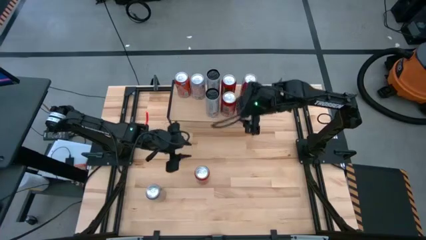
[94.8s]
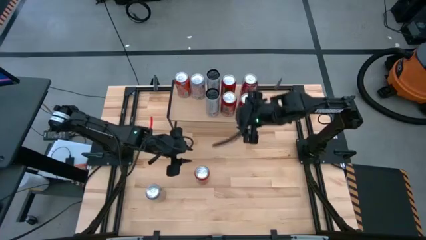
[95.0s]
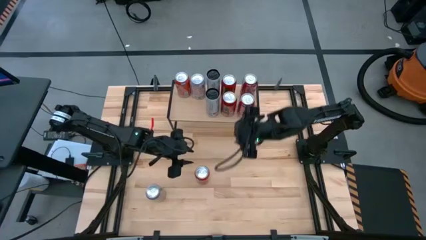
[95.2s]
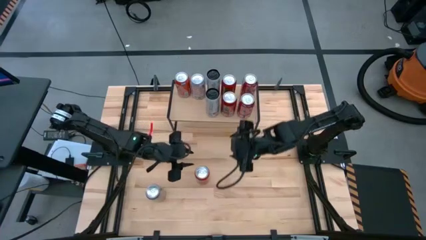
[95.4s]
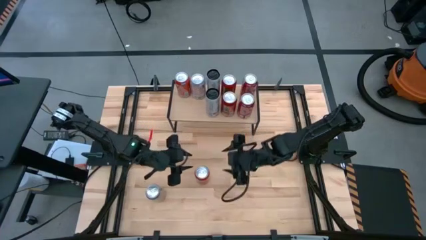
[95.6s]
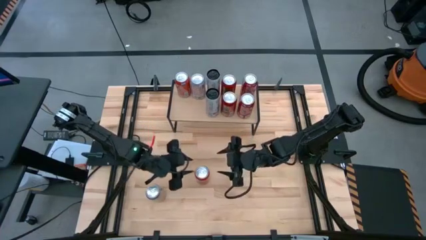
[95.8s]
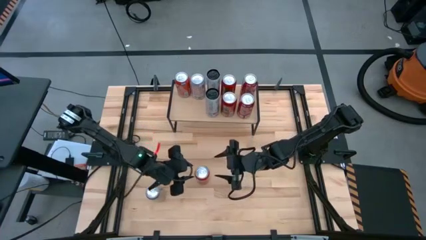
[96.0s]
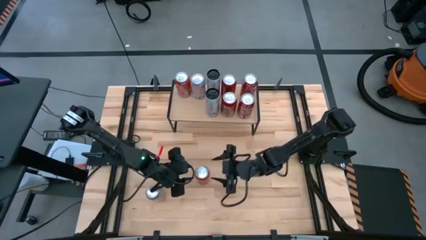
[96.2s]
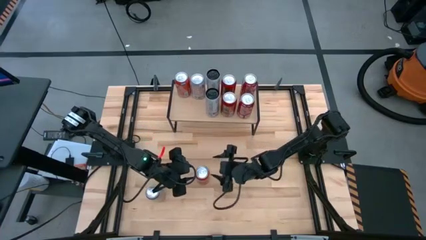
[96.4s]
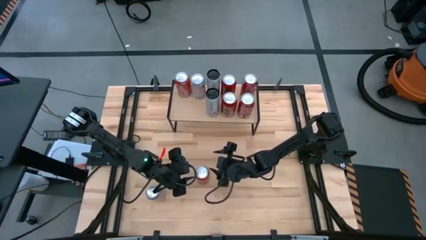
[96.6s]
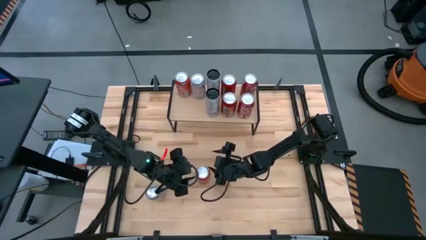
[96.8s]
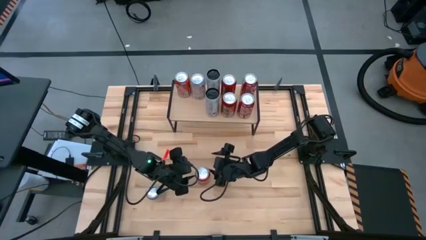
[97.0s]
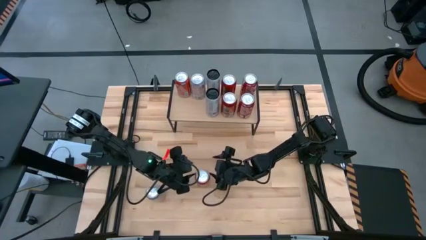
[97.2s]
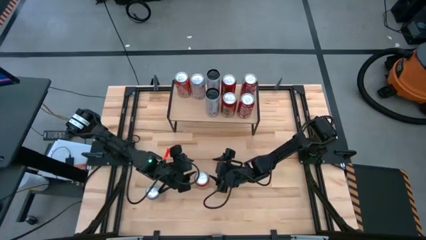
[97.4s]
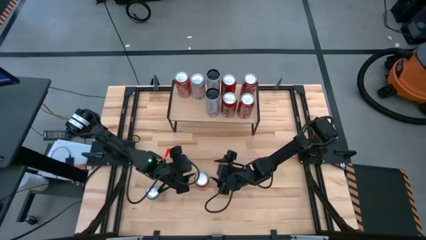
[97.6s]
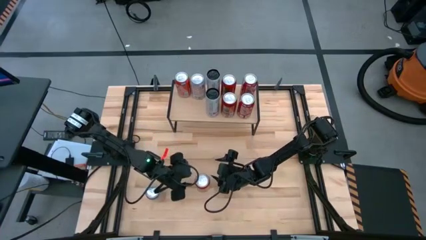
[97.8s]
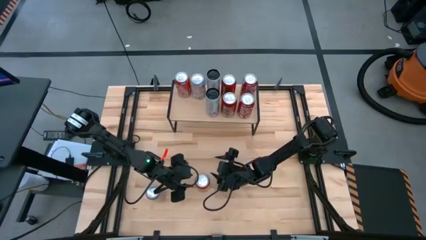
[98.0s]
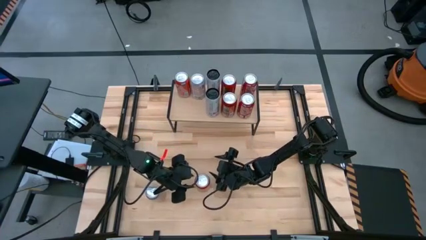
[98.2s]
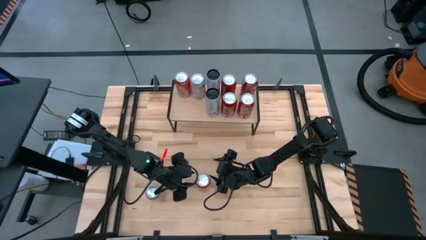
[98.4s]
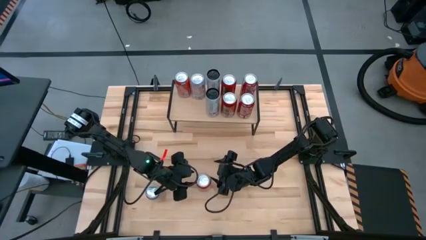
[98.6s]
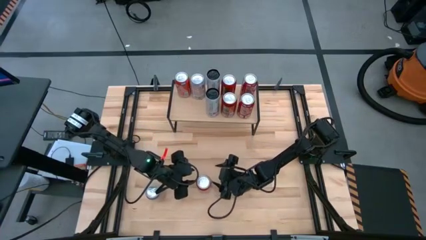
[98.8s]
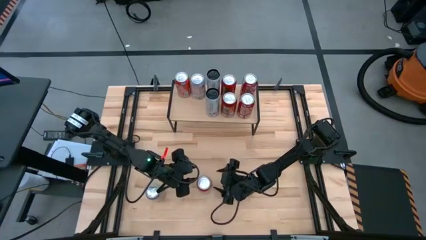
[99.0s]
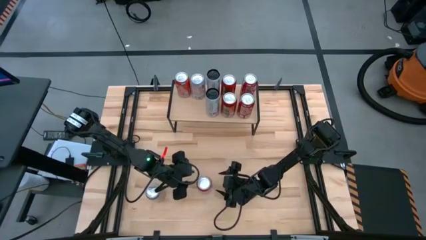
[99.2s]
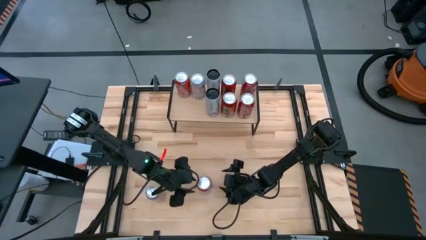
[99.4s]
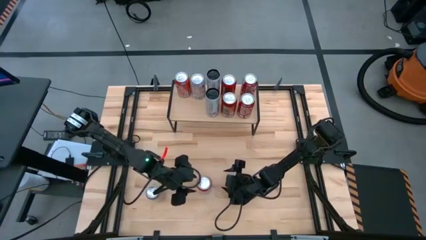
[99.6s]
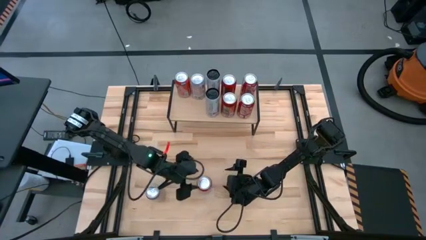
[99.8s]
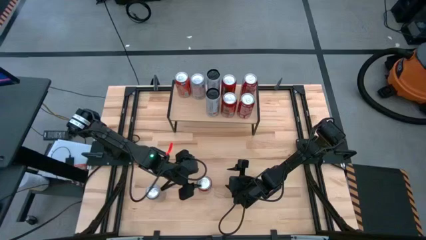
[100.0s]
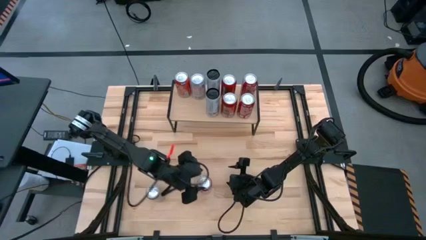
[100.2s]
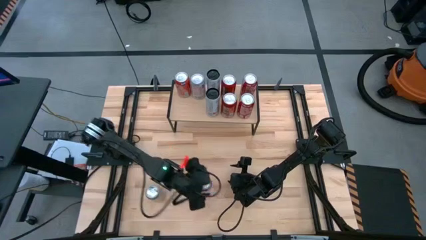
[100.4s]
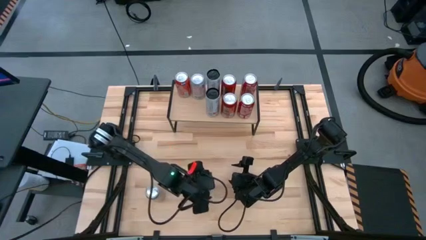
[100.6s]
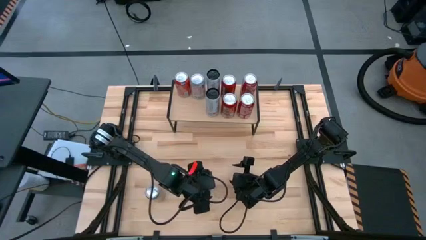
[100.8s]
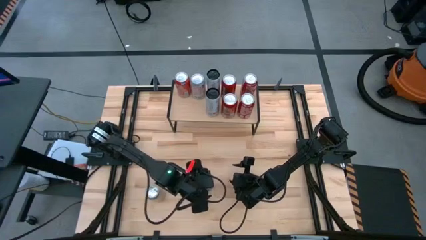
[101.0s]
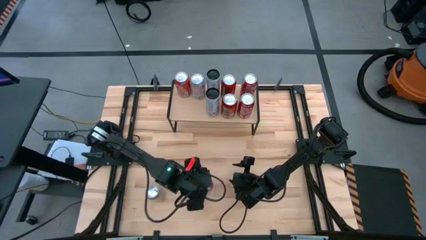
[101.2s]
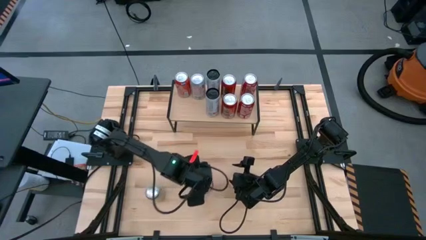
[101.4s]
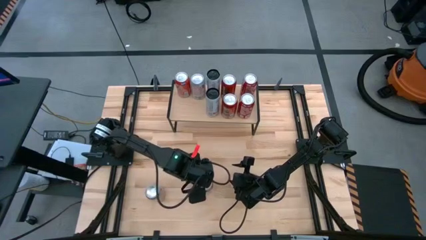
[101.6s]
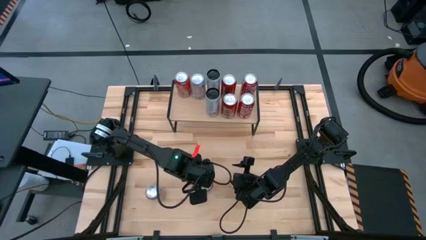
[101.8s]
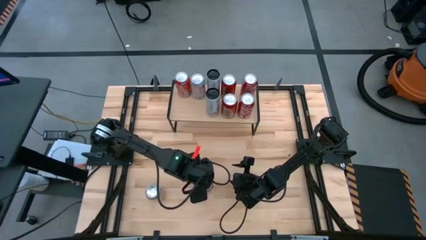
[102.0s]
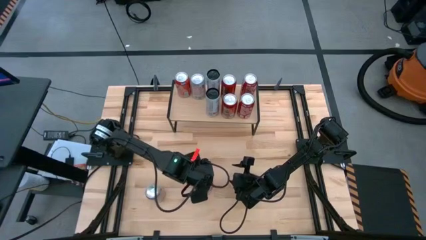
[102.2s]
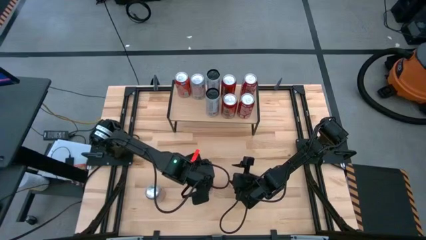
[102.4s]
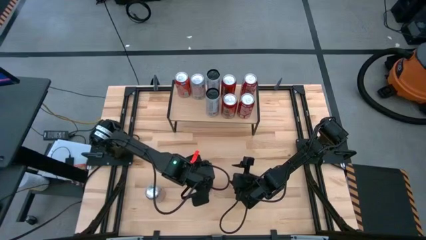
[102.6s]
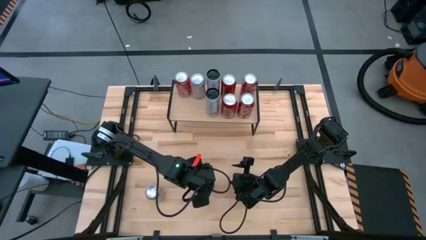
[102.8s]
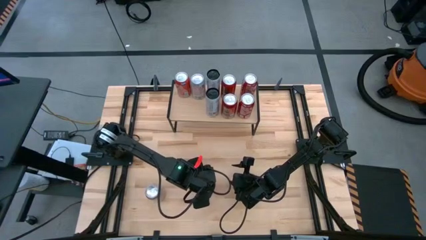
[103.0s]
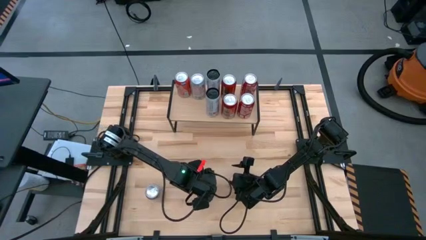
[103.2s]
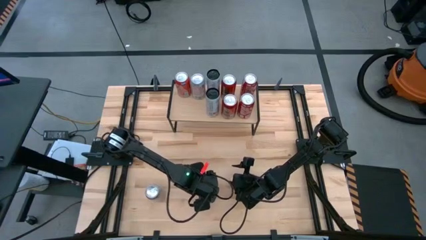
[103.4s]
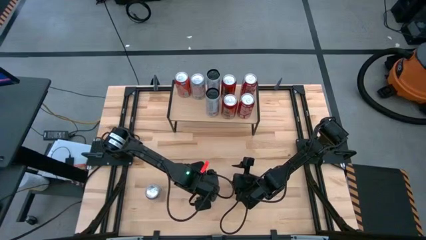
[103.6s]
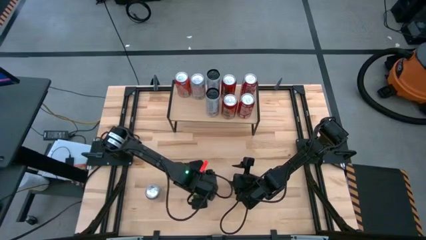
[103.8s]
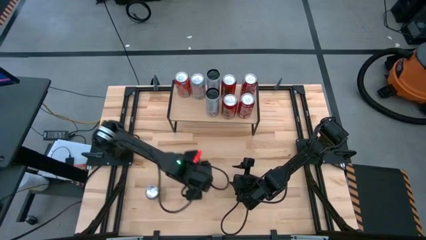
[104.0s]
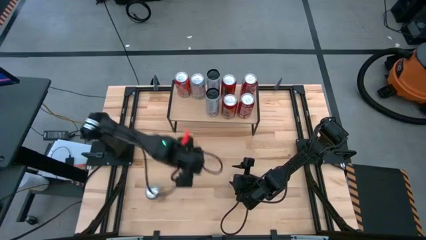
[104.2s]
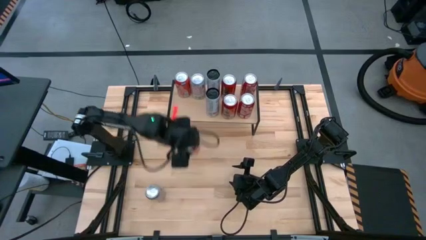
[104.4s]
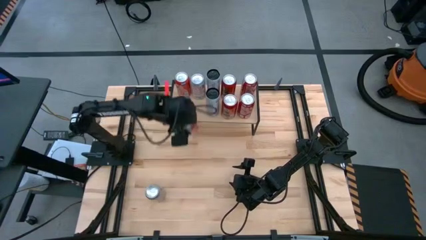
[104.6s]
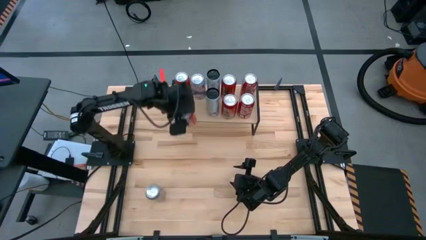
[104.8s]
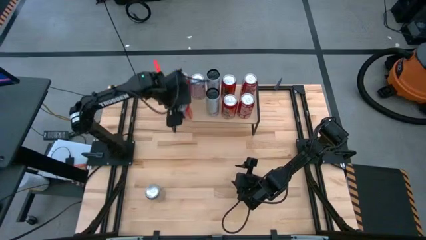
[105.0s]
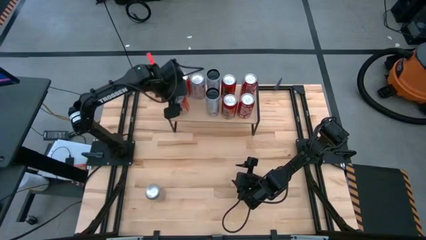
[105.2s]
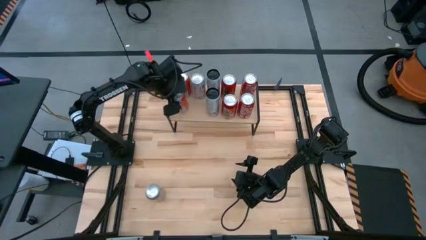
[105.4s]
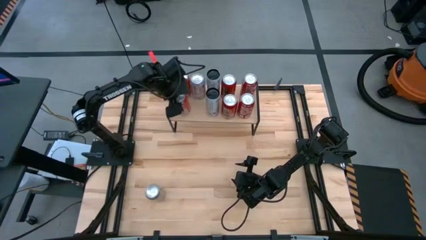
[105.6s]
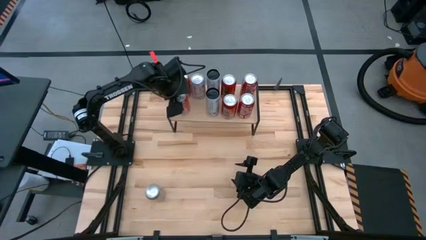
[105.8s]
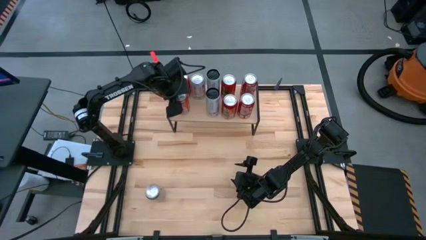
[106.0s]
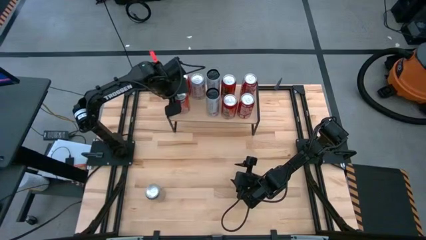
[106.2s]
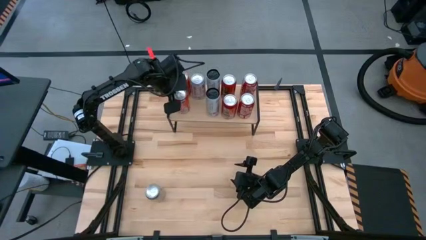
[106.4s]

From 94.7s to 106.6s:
Task: Place canned beverage on shelf
Put the orange soda can on the shelf

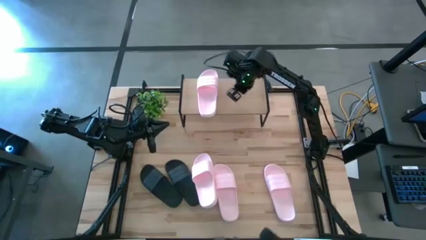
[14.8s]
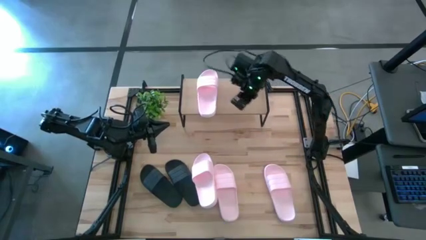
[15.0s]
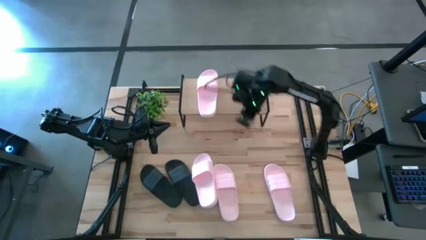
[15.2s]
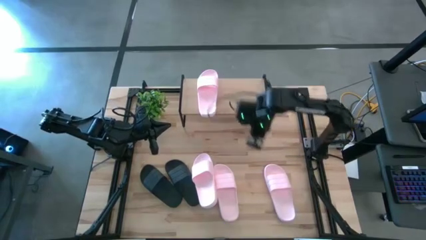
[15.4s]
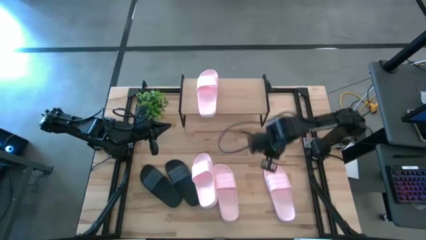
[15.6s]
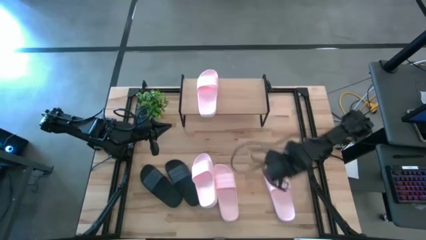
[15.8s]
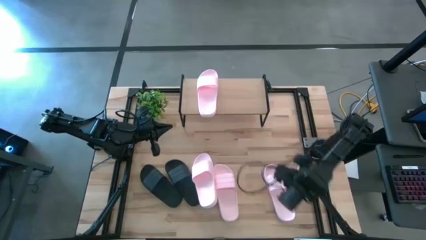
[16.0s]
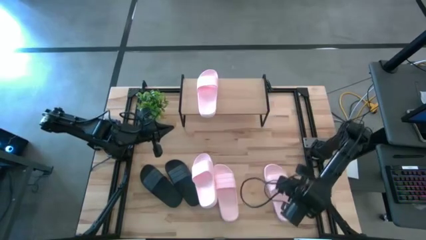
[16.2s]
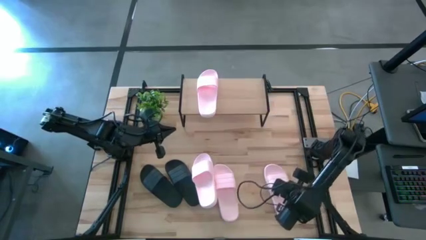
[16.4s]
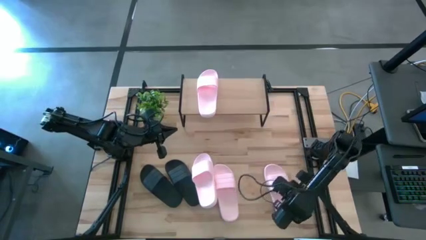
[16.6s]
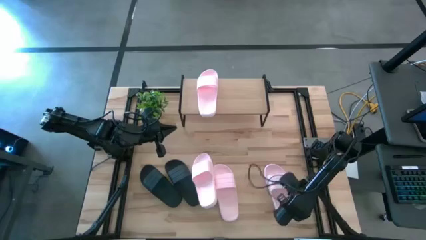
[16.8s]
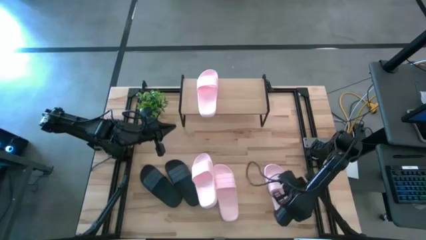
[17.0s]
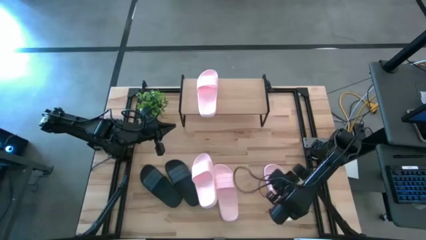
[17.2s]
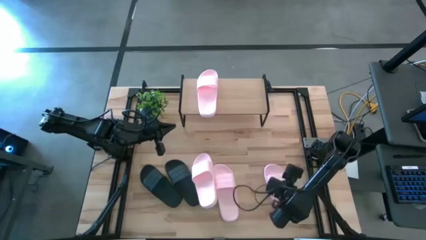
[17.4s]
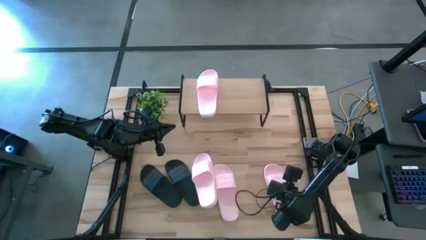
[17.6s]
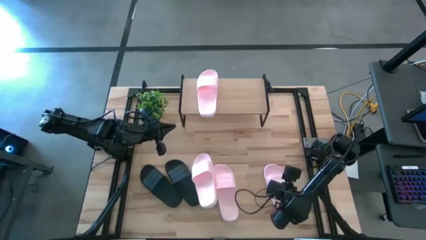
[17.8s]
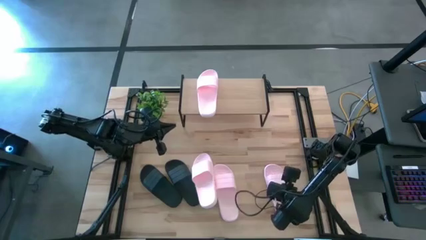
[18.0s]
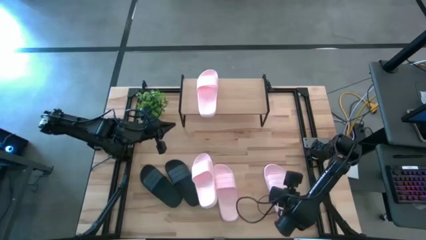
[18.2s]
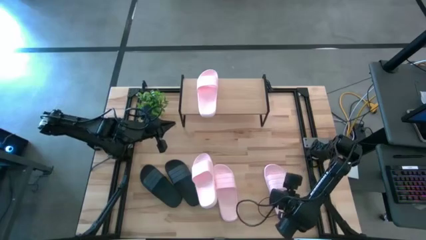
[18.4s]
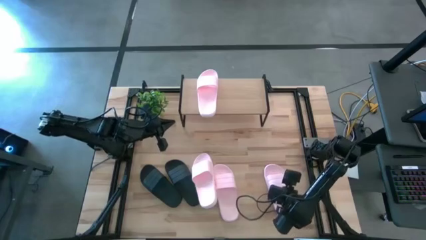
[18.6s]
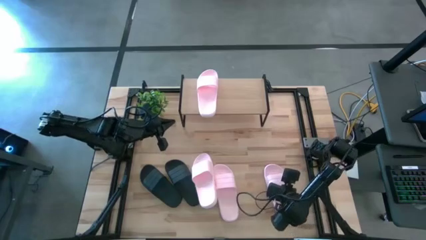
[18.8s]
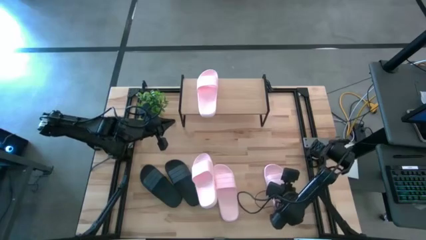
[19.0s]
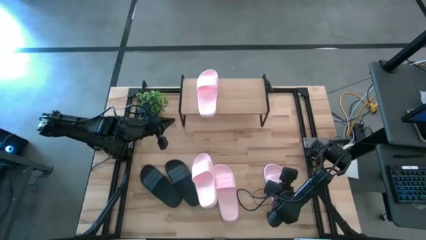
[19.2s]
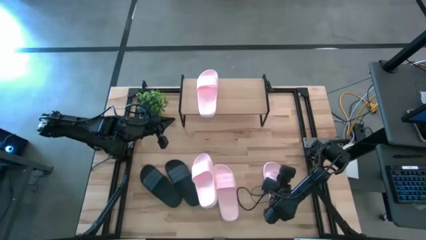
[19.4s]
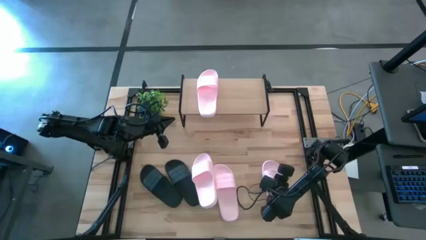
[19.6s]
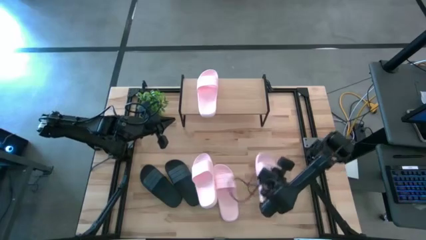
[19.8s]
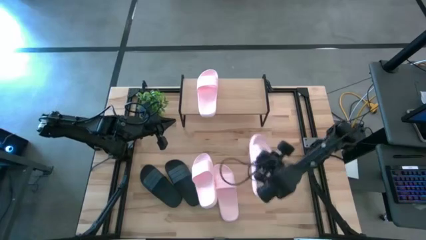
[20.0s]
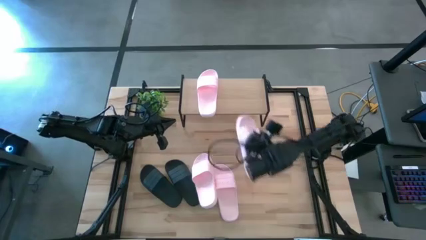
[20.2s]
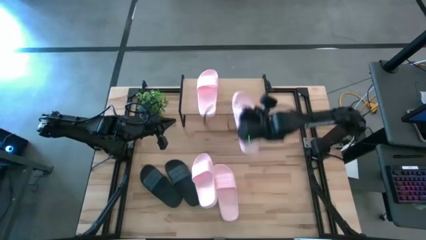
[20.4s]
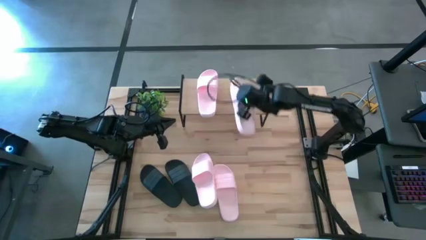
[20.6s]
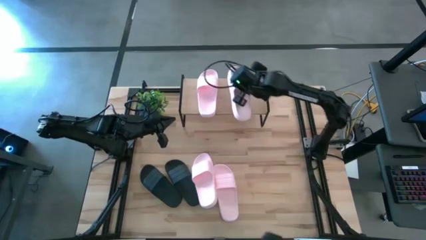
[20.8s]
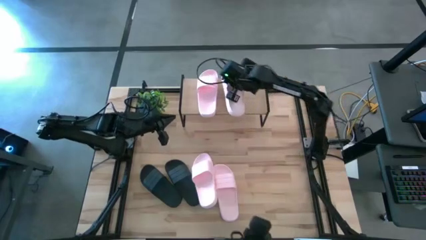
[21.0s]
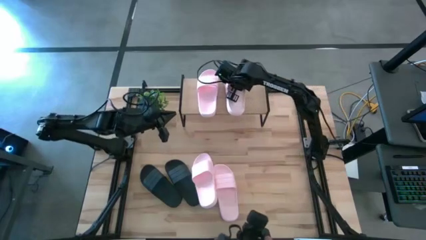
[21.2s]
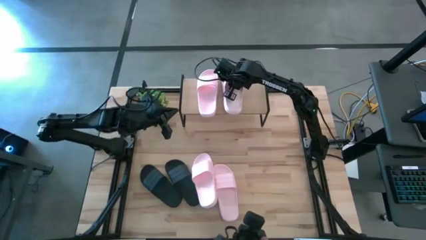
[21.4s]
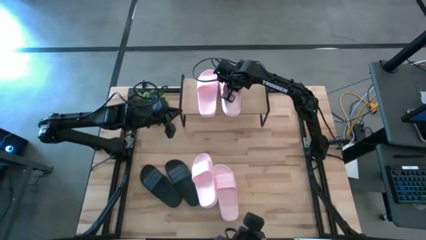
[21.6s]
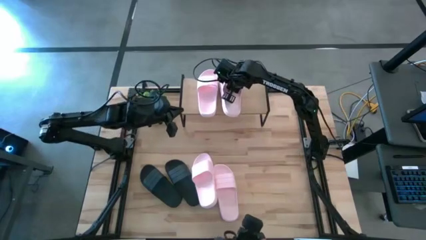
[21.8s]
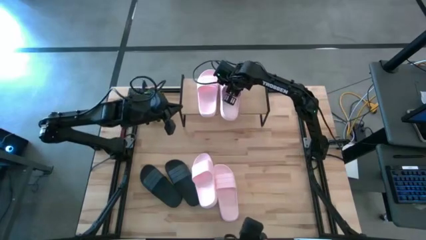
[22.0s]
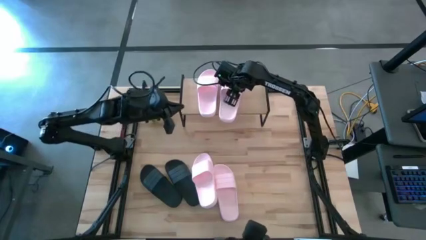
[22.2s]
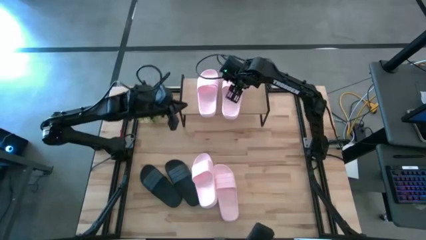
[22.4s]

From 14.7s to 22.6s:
Task: Pick and place slides into the shelf
Put the right pink slide on the shelf
